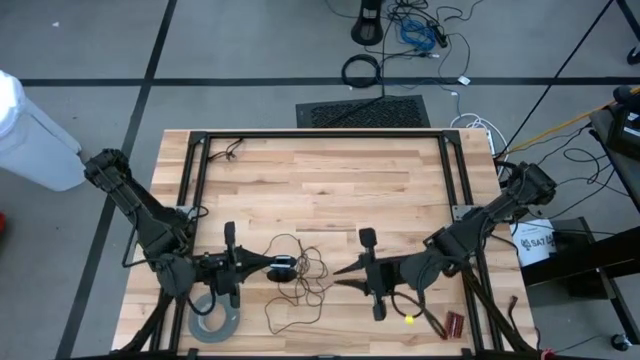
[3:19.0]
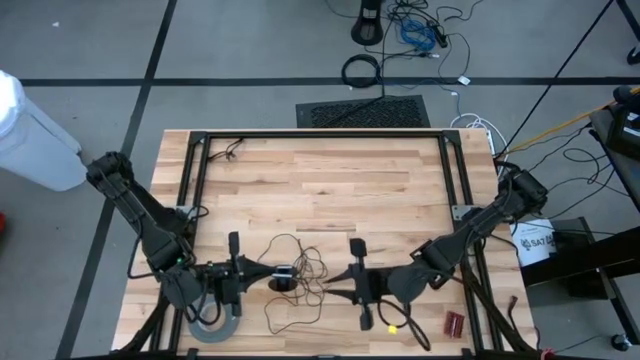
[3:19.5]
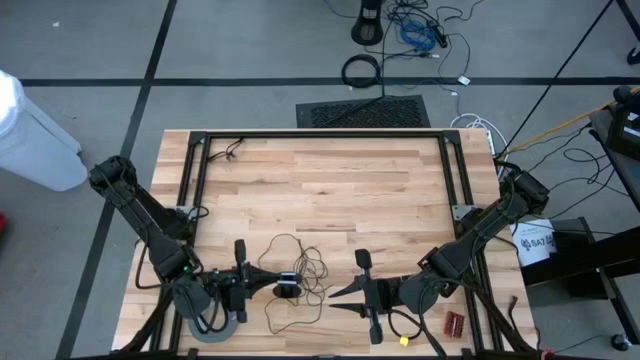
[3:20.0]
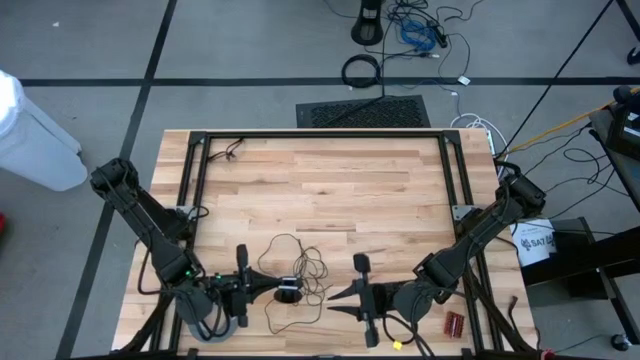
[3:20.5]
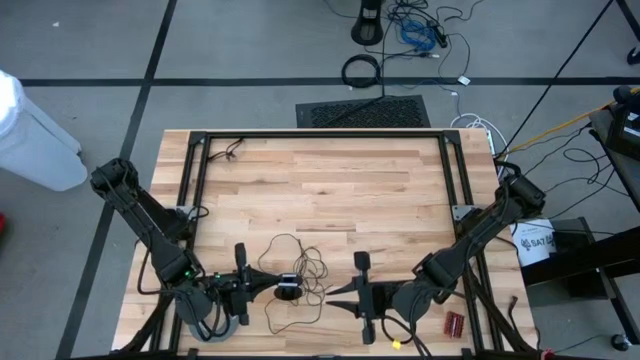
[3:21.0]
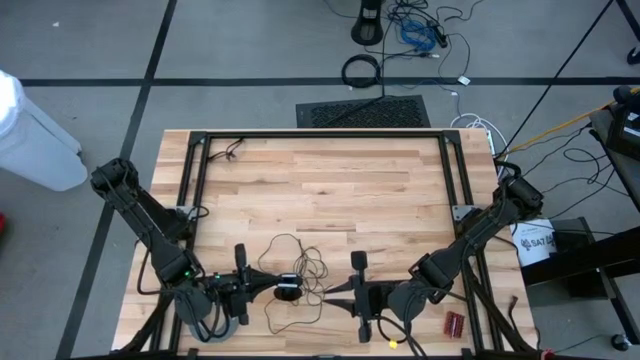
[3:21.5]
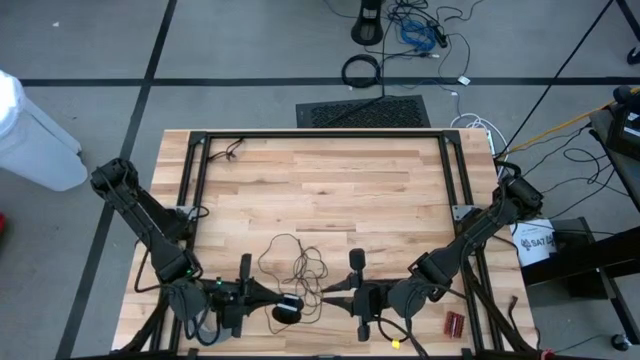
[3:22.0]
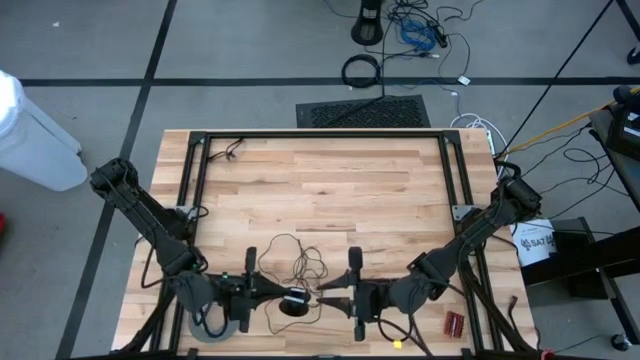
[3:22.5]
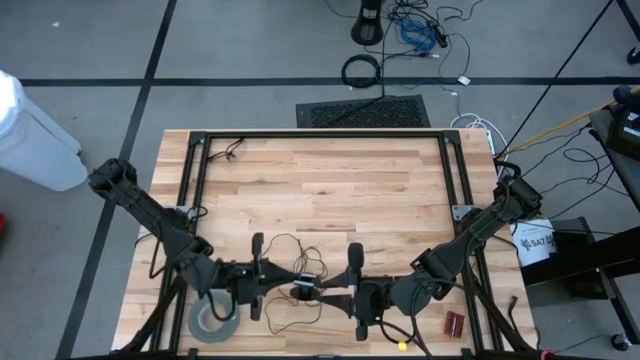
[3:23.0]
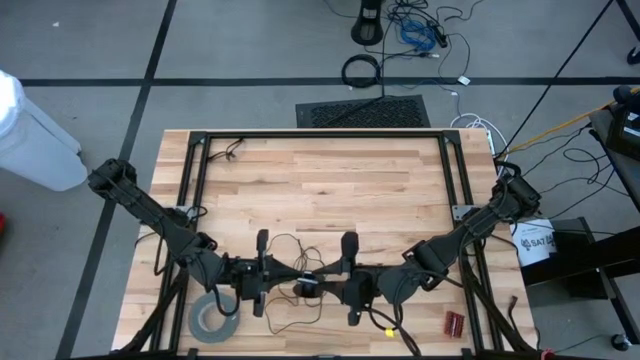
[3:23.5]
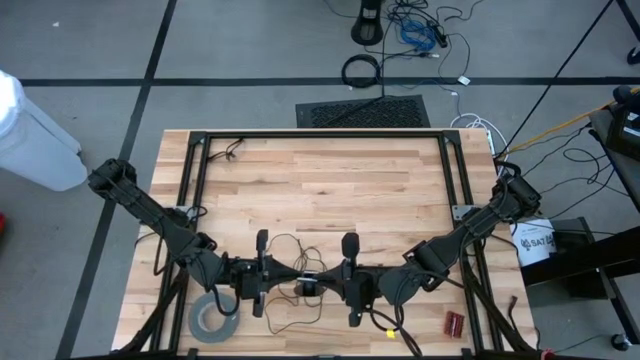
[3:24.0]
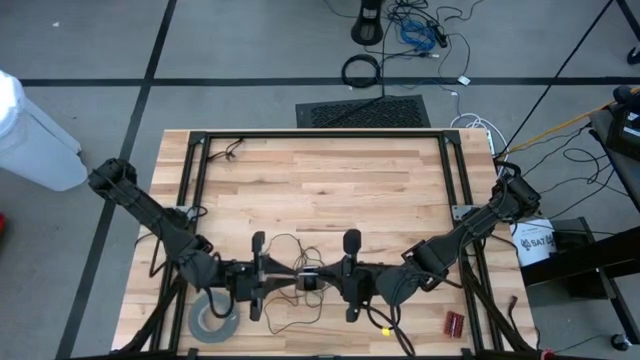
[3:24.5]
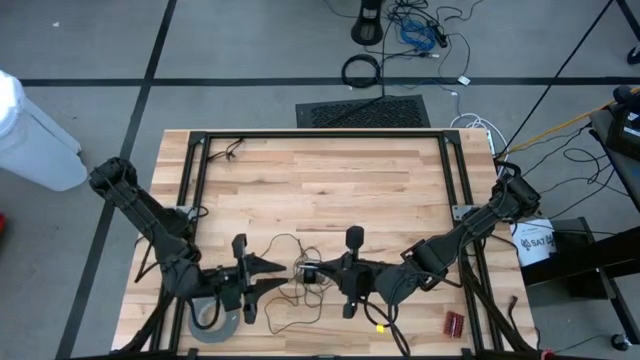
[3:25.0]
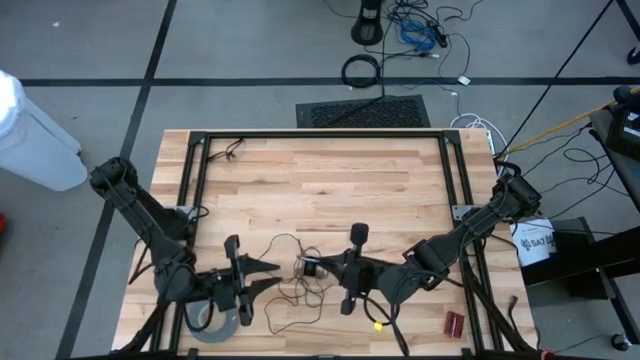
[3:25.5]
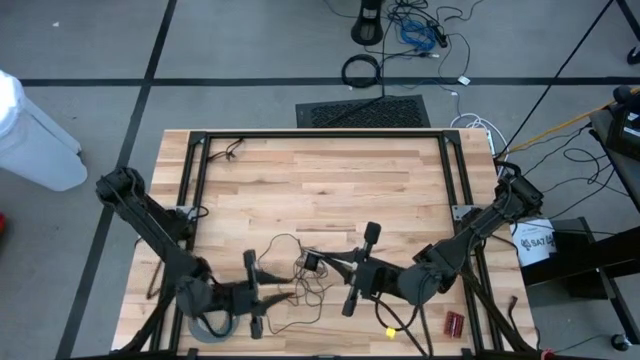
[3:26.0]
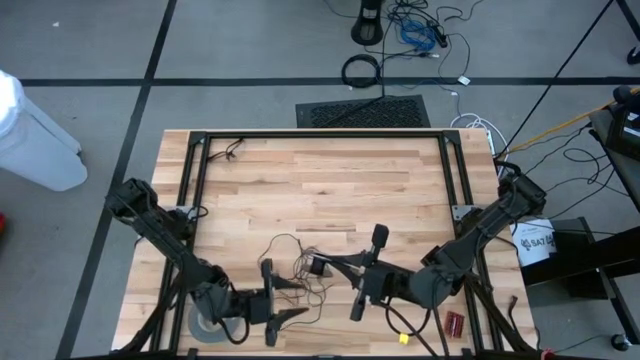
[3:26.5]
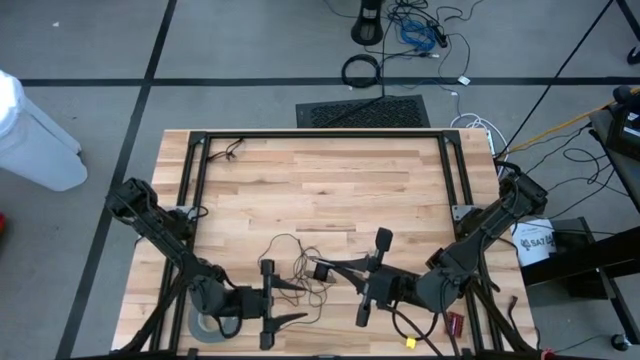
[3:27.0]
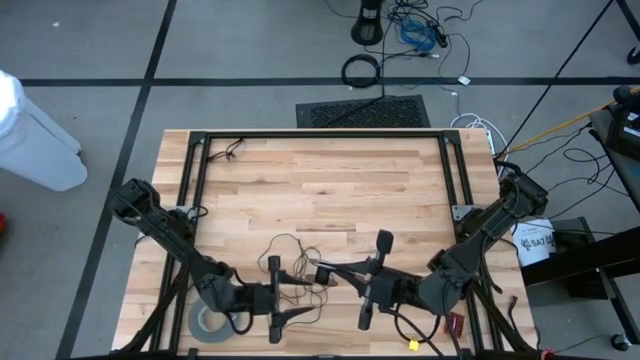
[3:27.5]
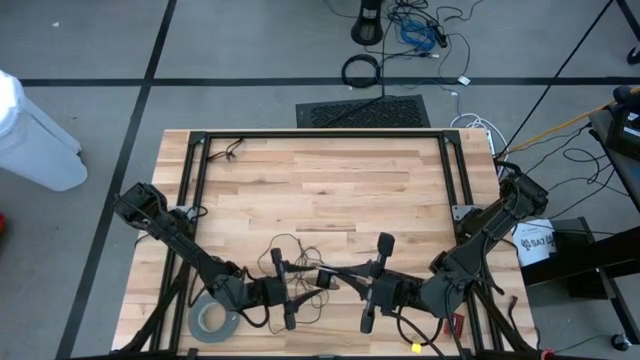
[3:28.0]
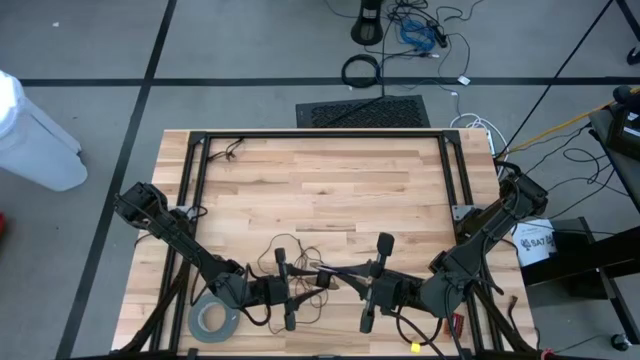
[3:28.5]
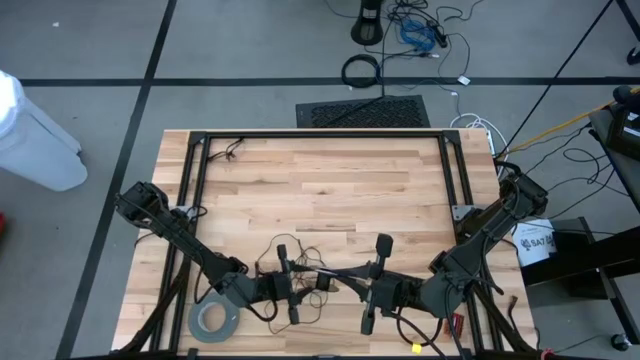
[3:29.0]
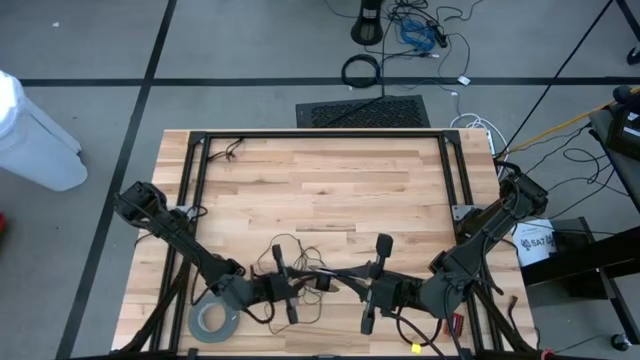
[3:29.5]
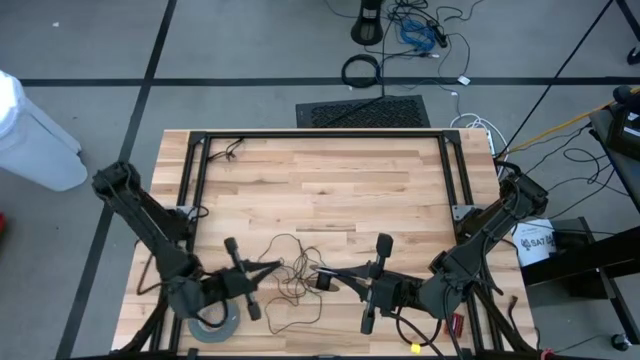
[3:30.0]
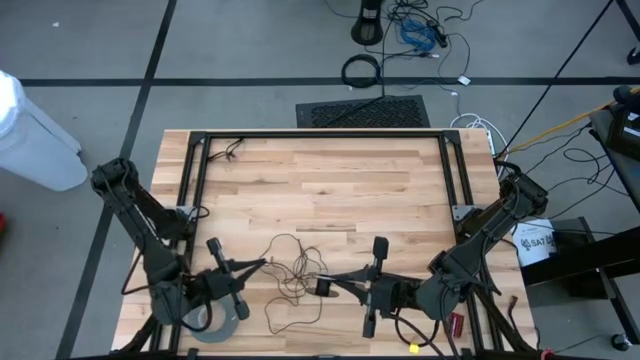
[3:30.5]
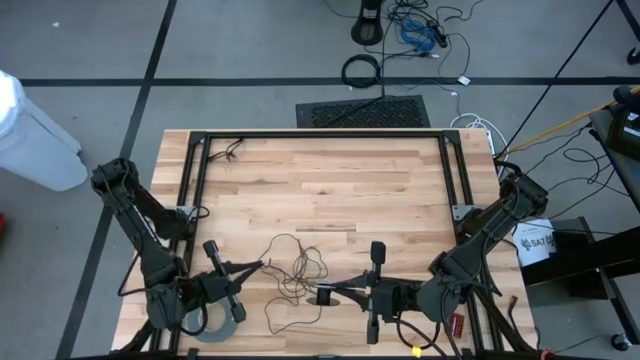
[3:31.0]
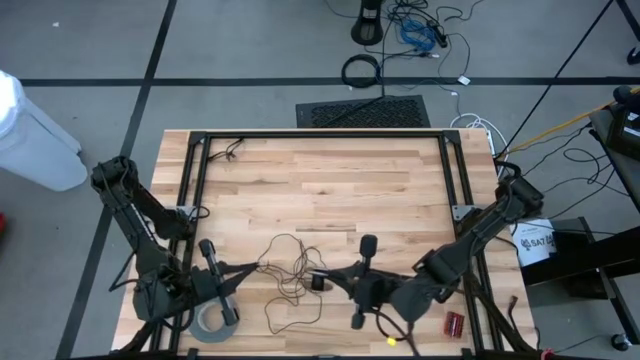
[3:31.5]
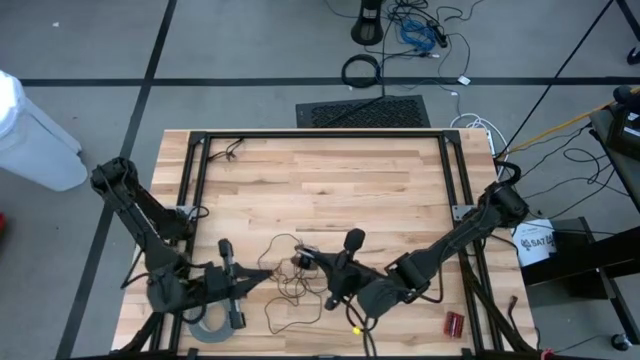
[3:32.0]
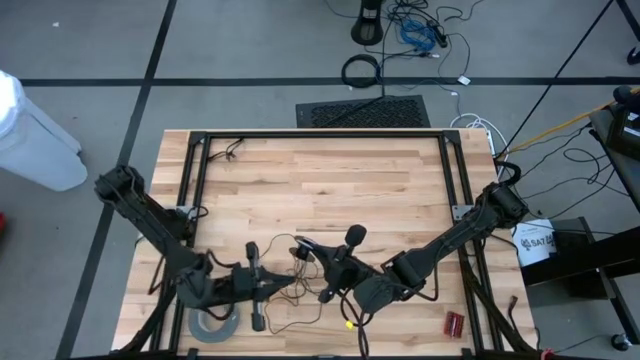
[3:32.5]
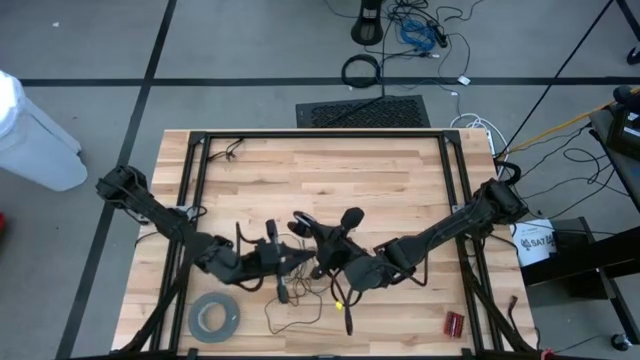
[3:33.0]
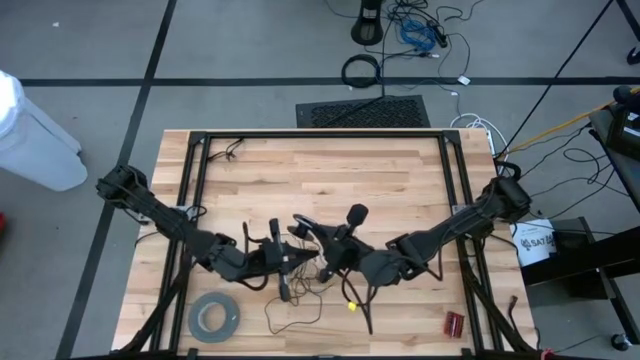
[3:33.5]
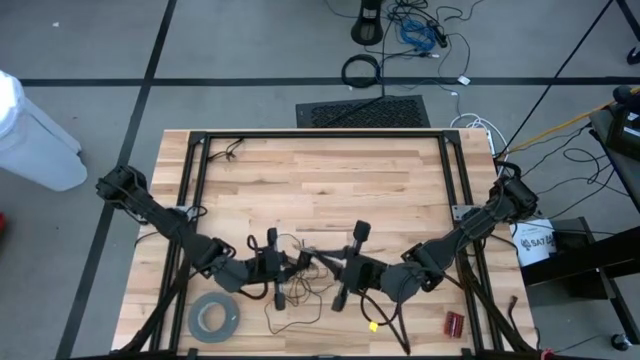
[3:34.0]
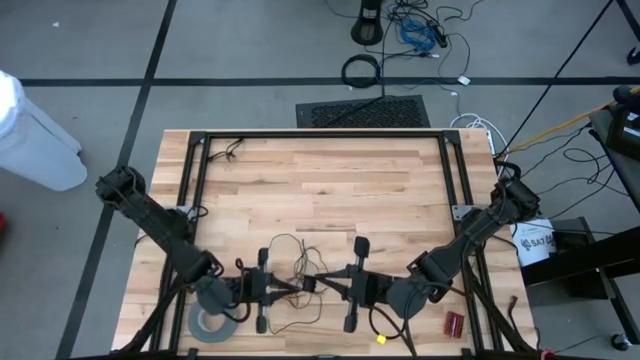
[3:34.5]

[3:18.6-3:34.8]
Task: Coil cords
Coil the black wire onto the spool

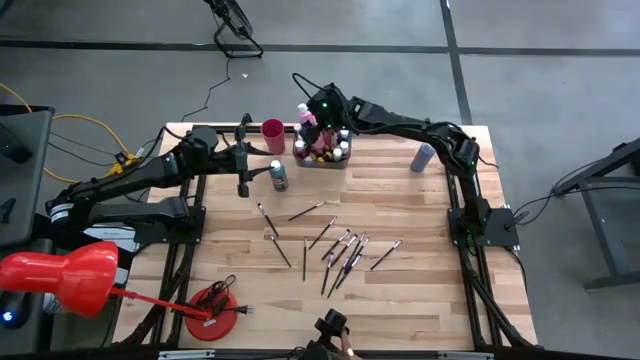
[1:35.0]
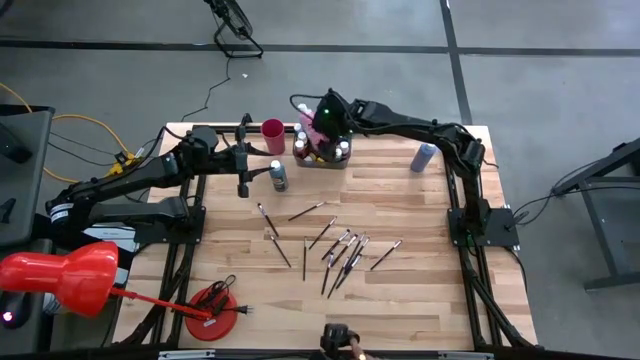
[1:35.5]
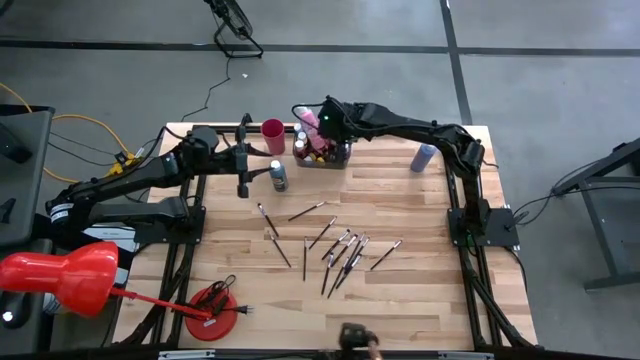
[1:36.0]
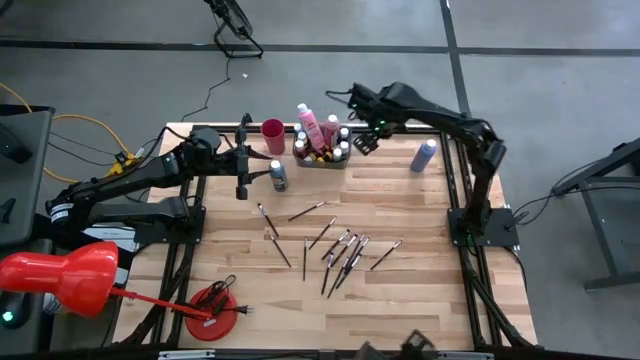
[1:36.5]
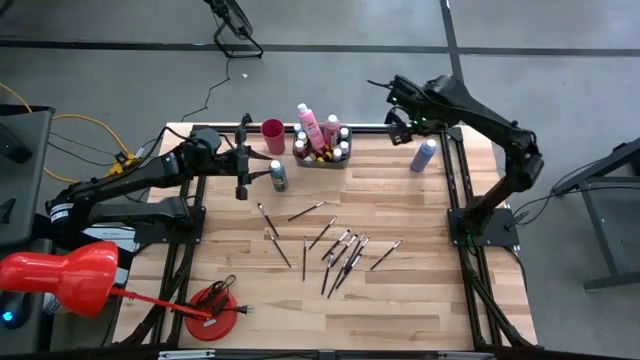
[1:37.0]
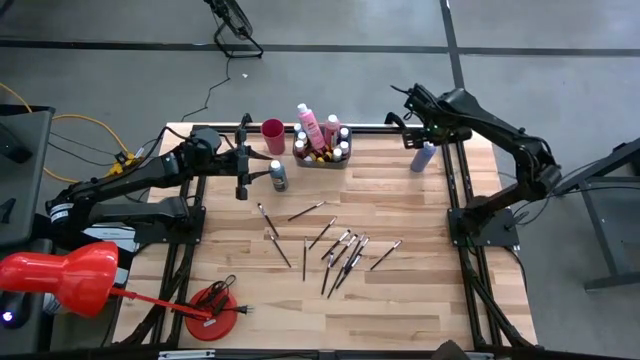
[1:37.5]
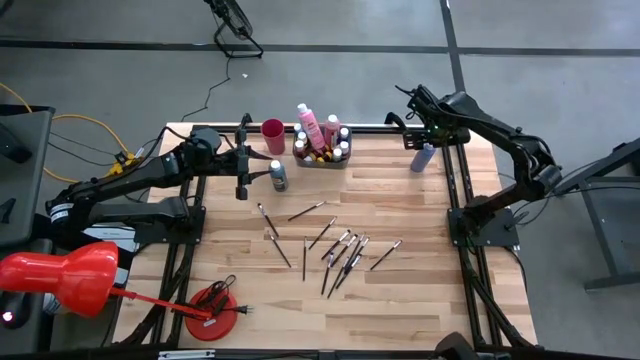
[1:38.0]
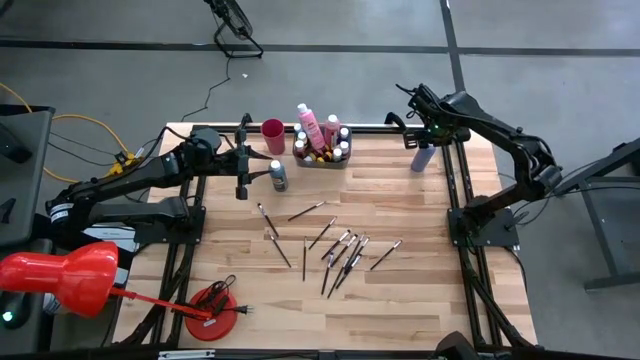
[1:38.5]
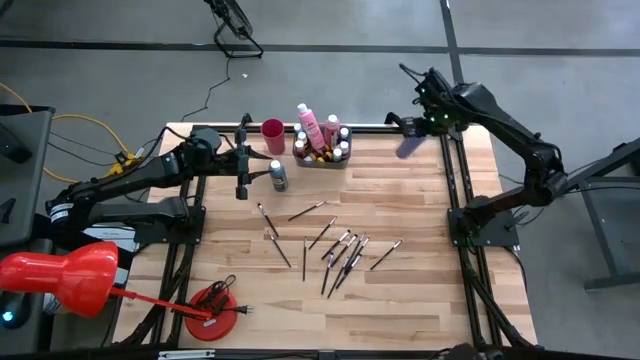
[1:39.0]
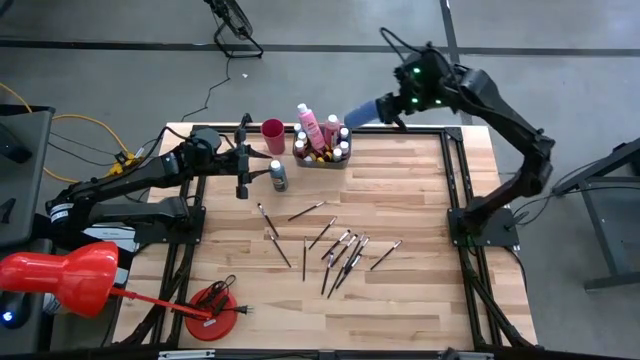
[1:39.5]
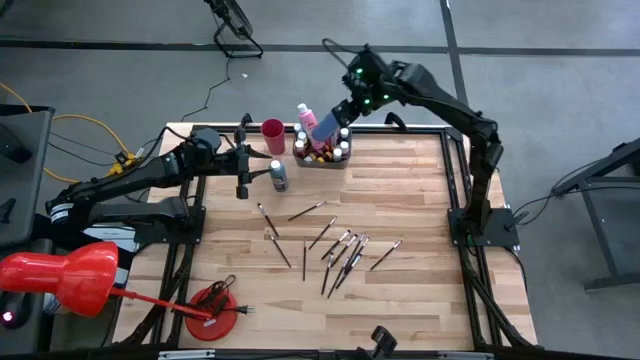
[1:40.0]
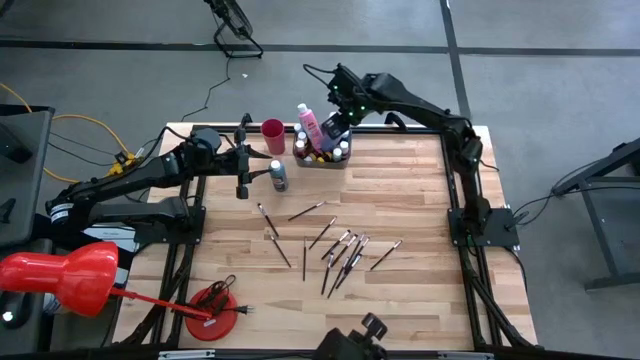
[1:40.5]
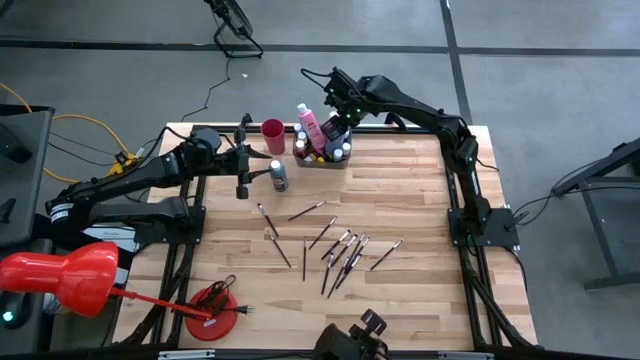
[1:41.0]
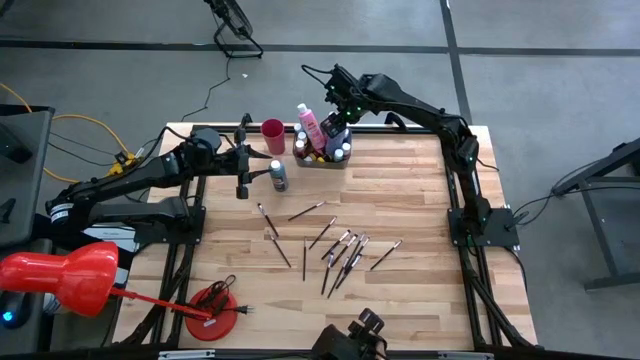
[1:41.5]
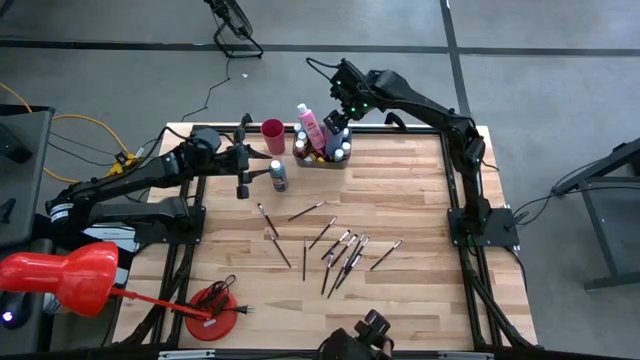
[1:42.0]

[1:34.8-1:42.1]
Task: Pick & Place Paint Supplies
Put the big blue paint bottle into the black bin
